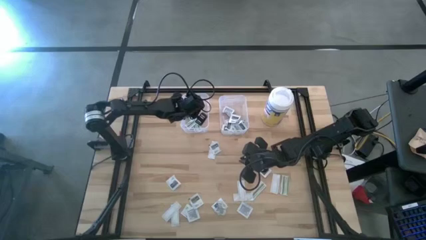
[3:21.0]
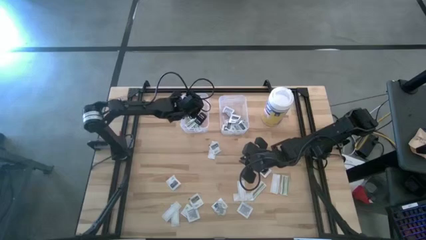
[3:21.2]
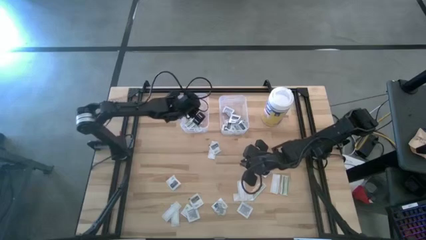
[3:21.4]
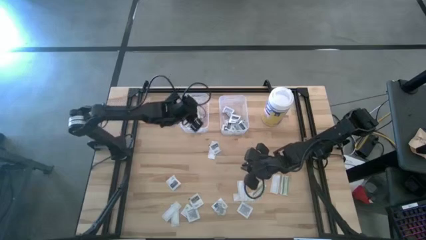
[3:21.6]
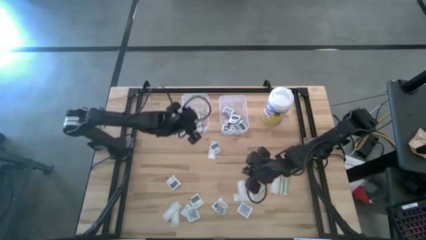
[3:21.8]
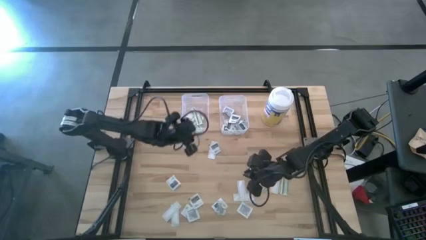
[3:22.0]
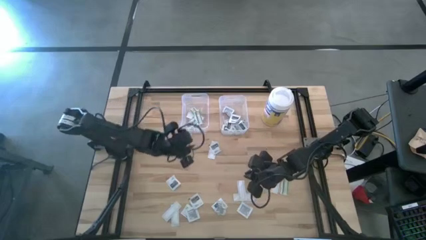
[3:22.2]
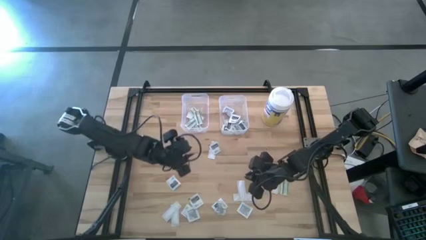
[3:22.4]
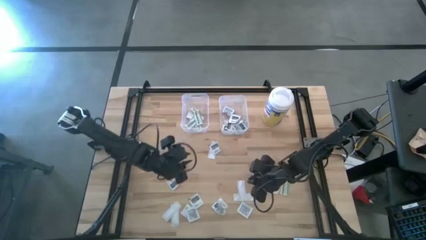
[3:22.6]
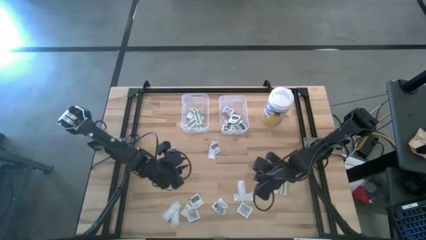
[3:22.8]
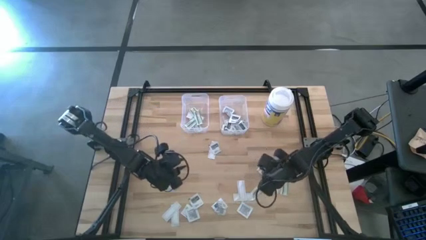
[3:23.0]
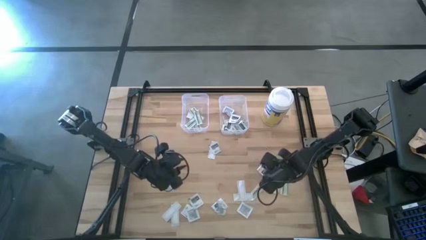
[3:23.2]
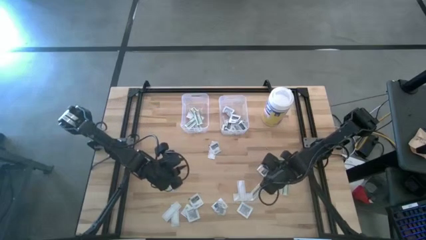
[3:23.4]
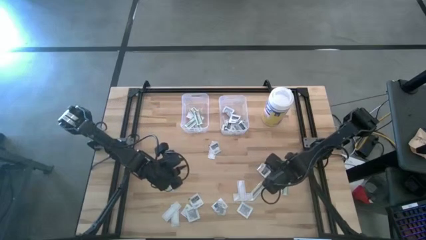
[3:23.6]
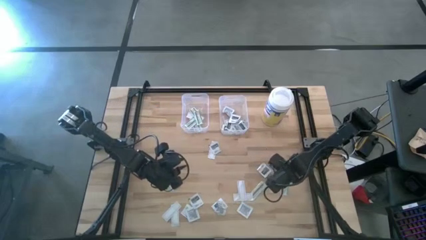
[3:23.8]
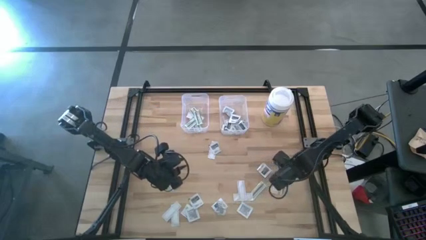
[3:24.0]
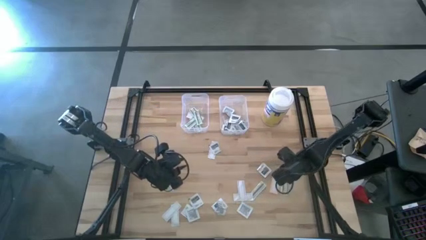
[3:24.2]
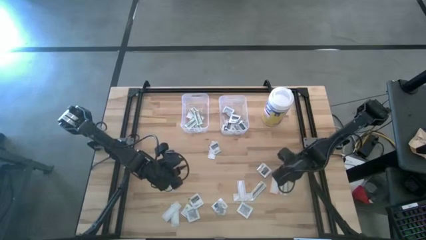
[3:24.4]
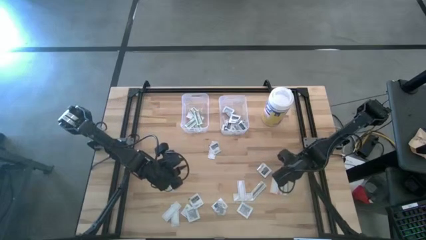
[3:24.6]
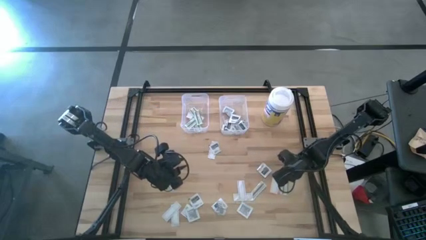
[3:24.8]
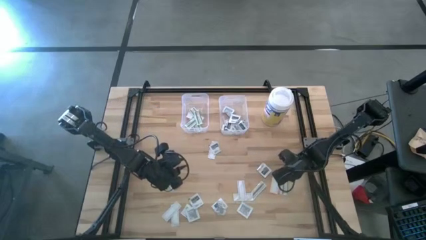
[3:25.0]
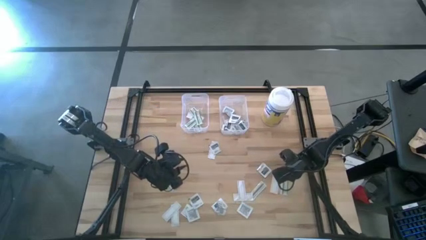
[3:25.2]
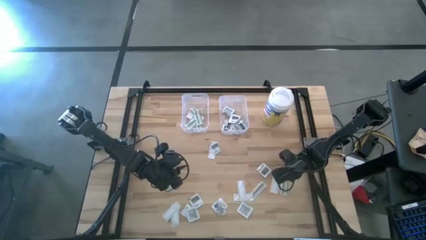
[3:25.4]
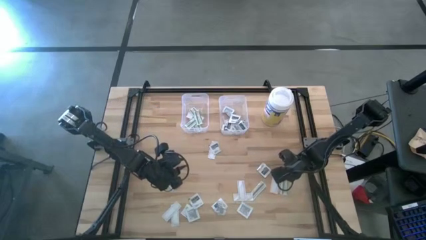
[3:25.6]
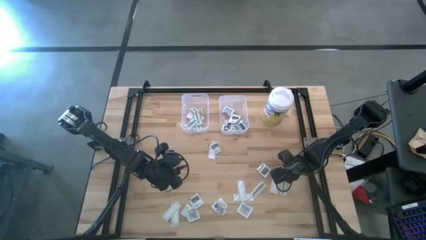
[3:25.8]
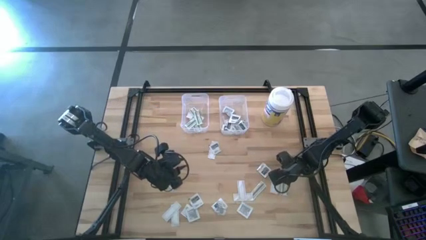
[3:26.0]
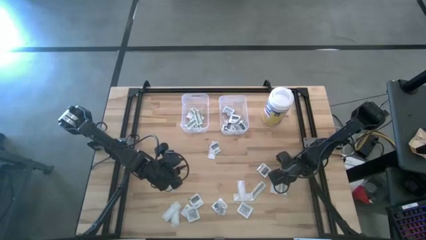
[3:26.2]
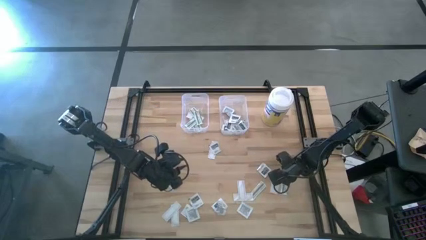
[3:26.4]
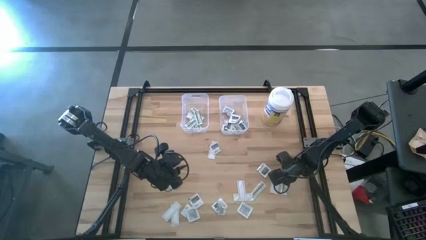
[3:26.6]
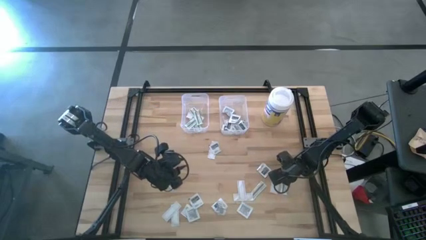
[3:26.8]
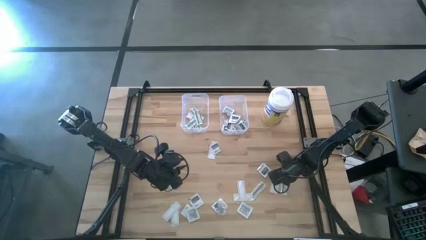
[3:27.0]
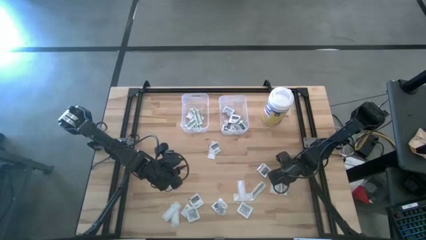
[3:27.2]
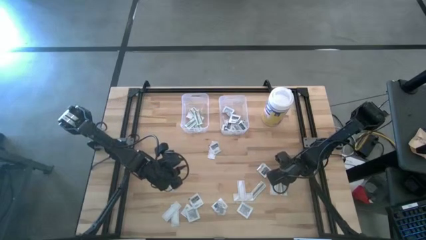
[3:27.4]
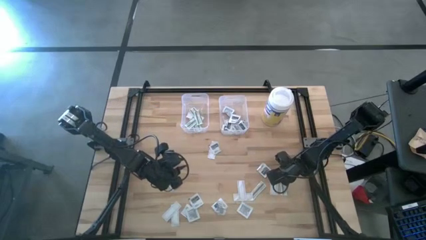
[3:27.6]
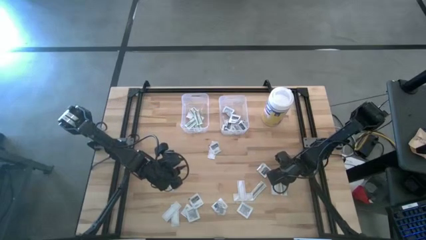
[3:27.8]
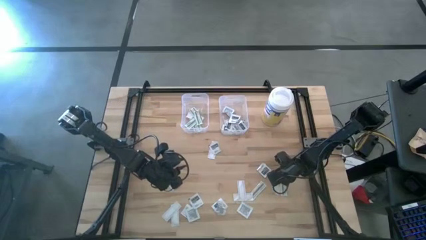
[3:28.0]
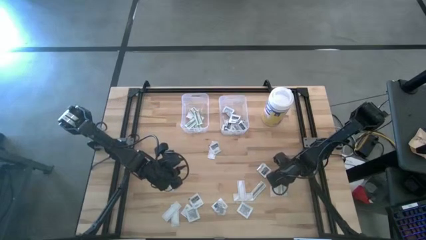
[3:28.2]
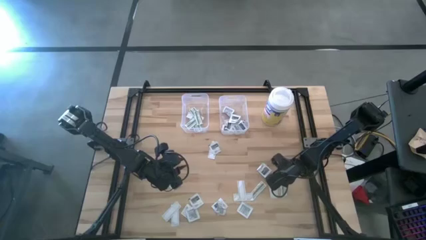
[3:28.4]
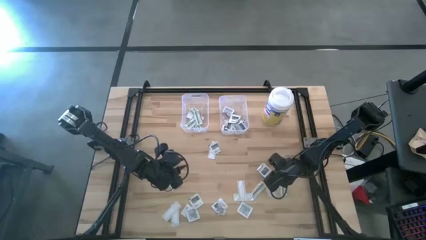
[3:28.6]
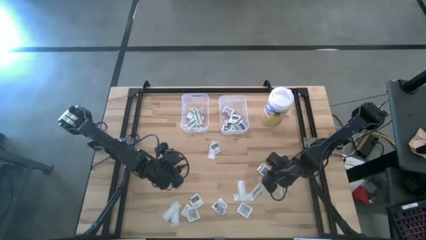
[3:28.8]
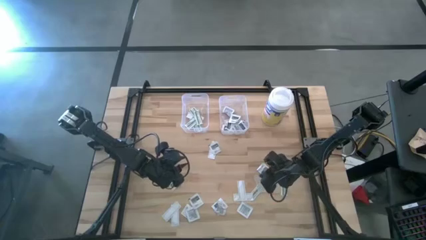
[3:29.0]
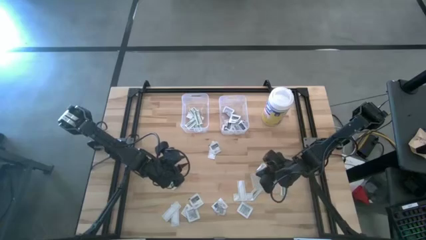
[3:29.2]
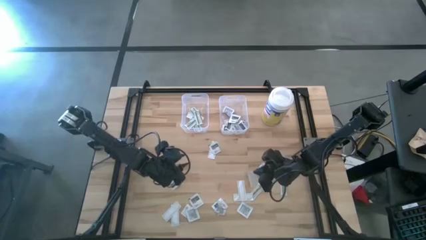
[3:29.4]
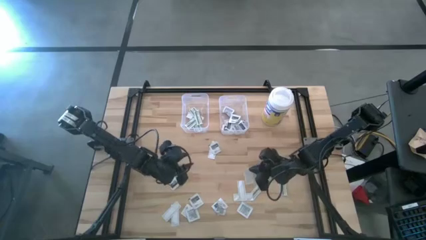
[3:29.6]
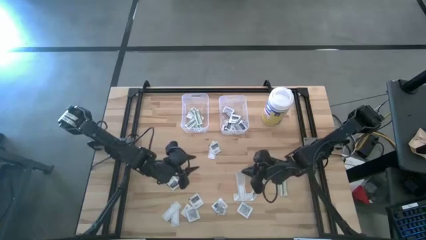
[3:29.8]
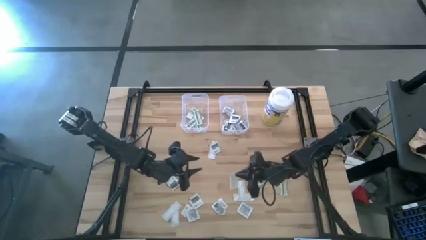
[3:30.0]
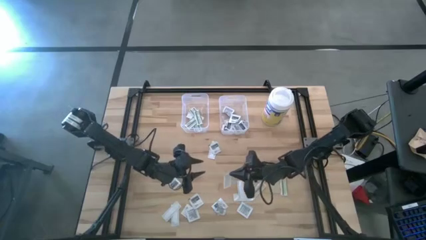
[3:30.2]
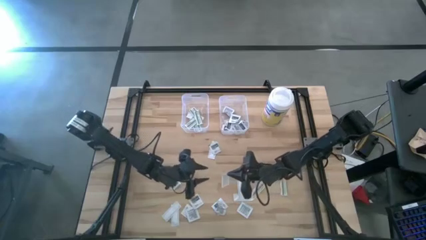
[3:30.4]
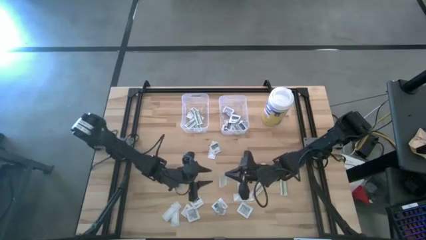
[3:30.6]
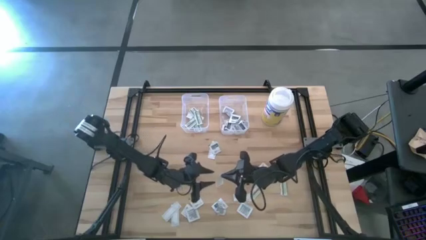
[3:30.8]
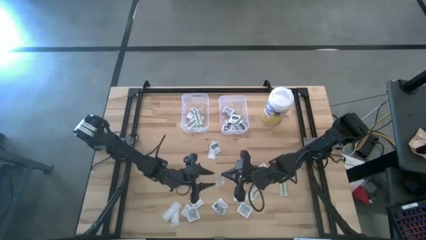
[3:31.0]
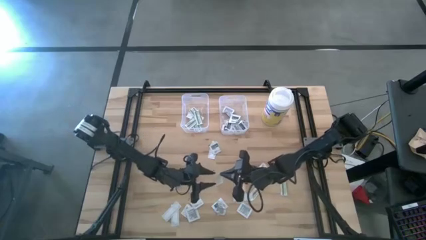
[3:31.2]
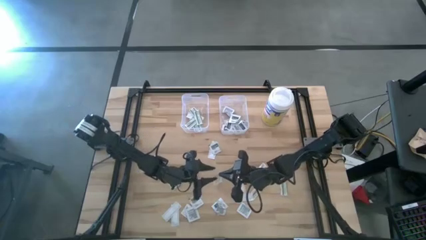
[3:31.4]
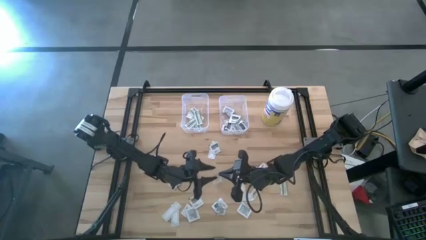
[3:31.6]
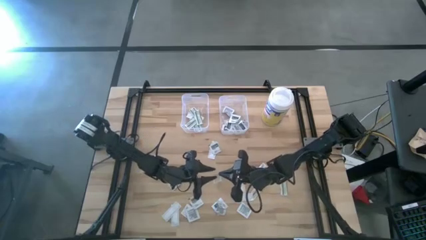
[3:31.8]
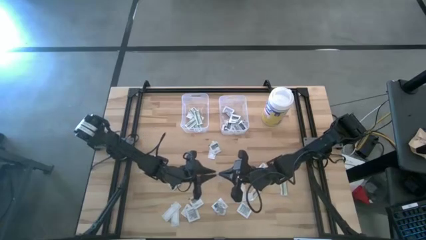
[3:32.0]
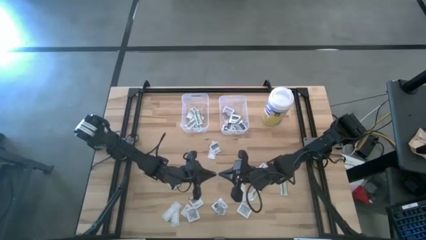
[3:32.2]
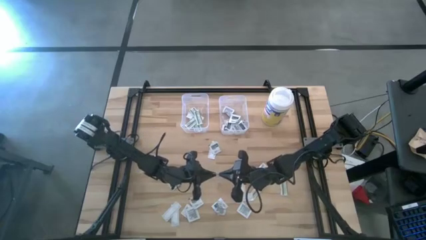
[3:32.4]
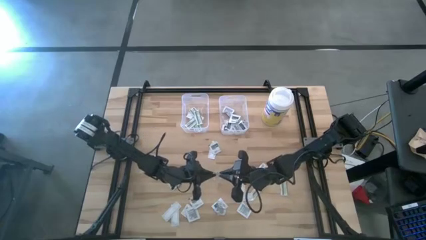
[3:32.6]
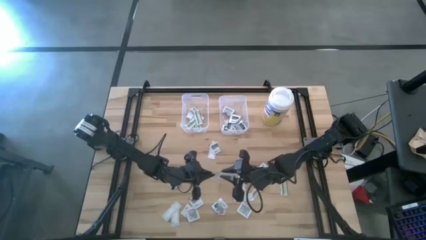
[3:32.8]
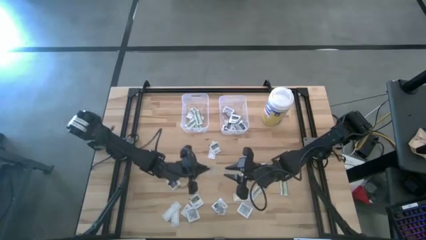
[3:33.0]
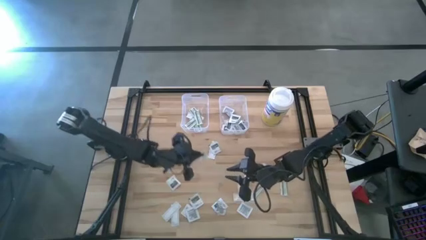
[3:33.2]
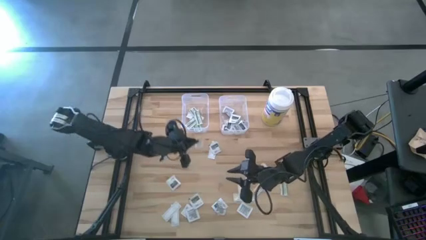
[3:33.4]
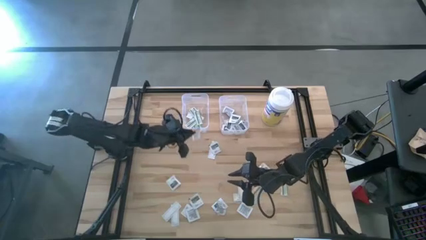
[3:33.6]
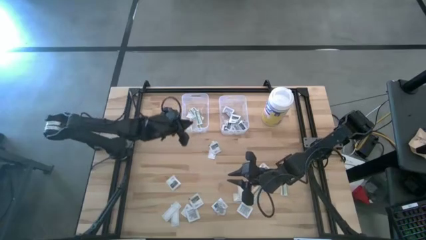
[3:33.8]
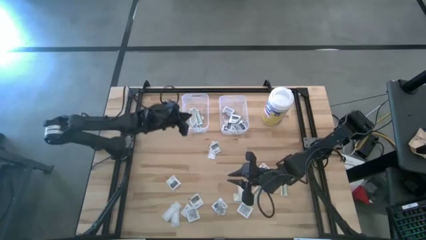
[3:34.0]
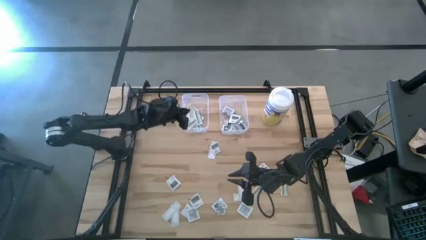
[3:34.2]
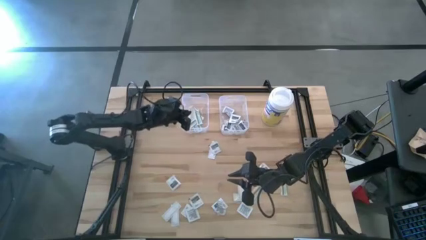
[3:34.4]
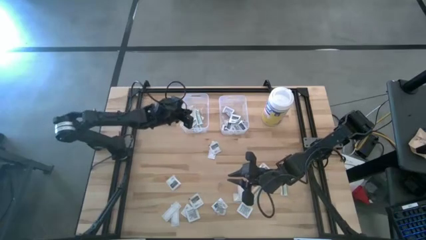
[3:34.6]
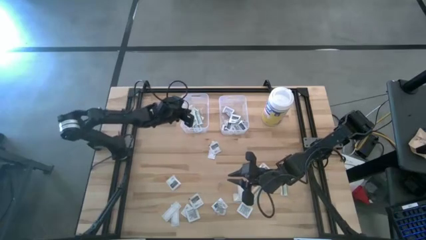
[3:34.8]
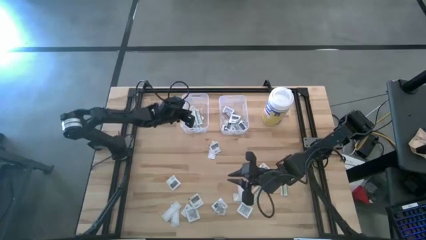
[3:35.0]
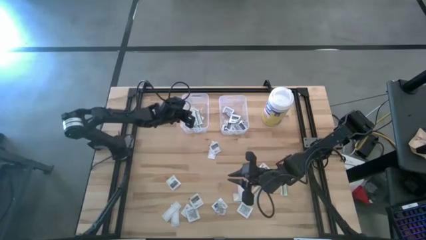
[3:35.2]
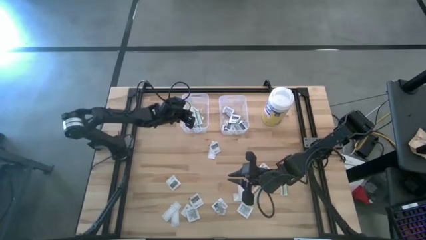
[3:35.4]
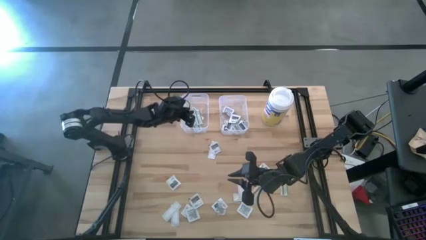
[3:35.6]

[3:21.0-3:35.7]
Task: Pick & Place First Aid Supplies
Put the green bandage pack into the left transparent bin
